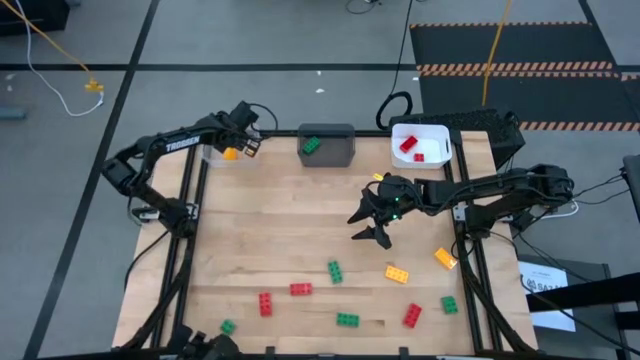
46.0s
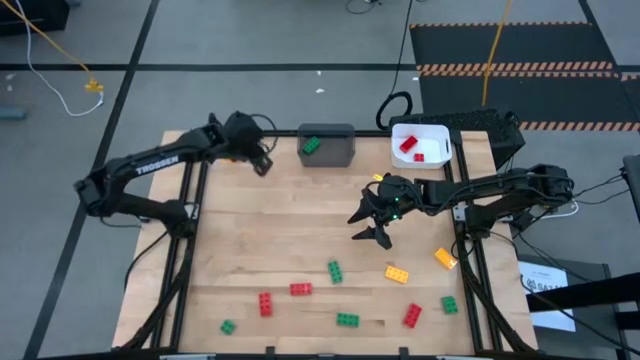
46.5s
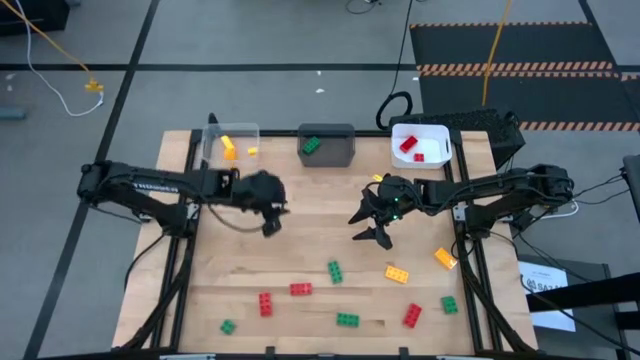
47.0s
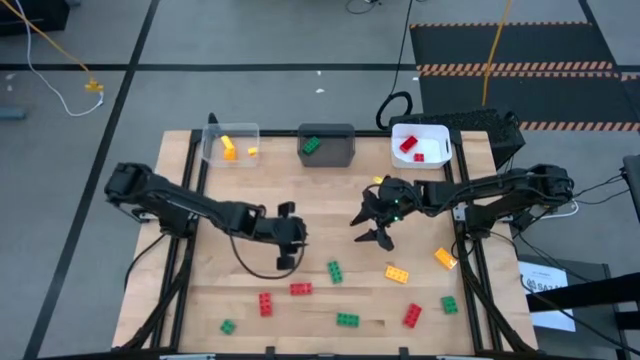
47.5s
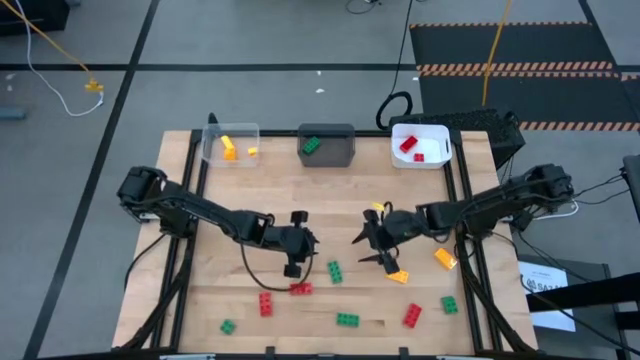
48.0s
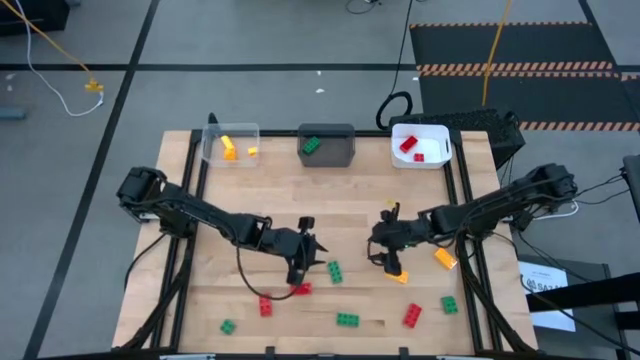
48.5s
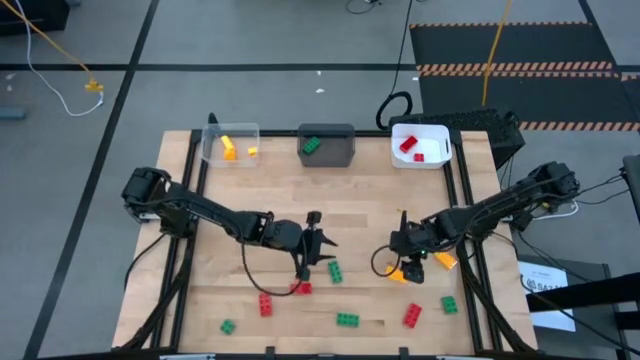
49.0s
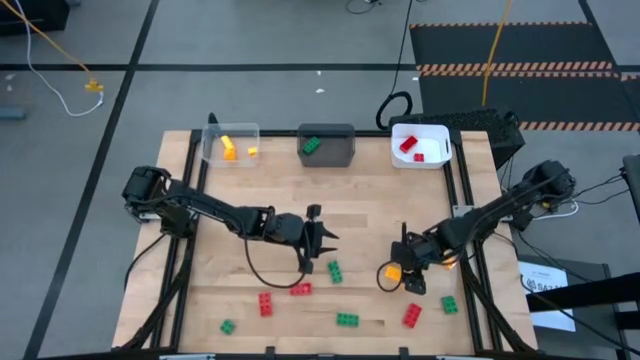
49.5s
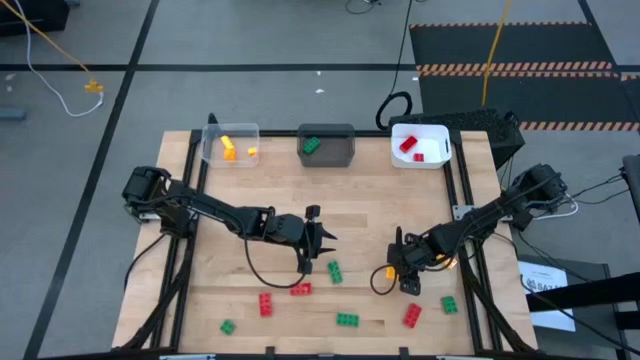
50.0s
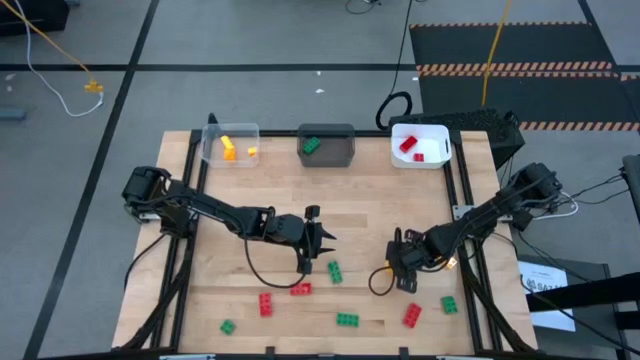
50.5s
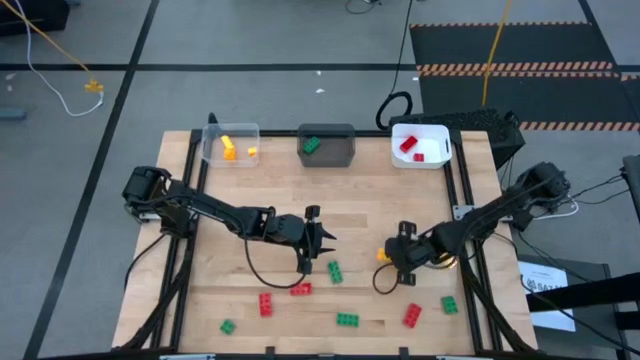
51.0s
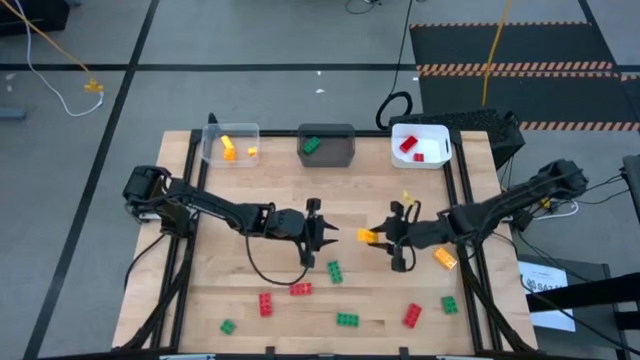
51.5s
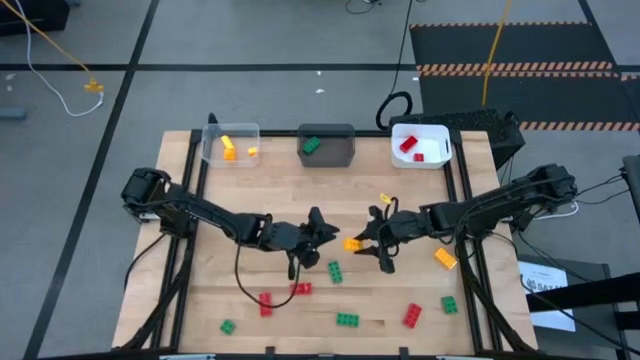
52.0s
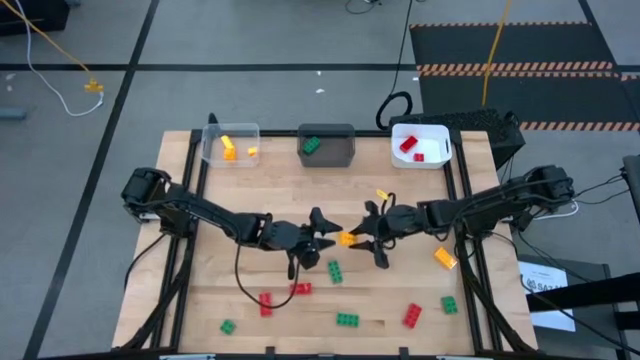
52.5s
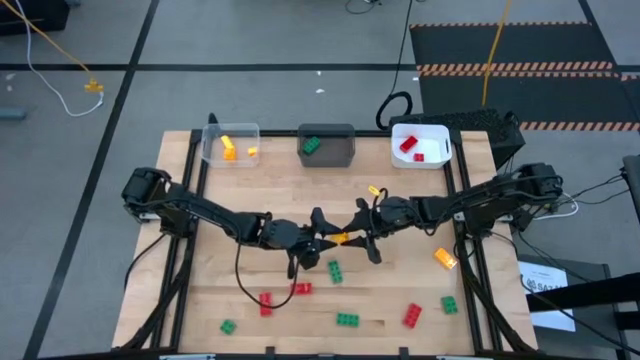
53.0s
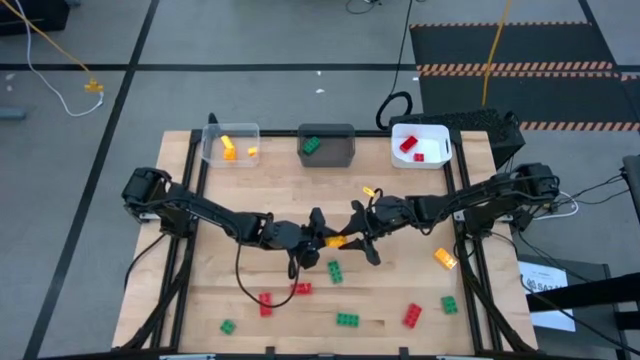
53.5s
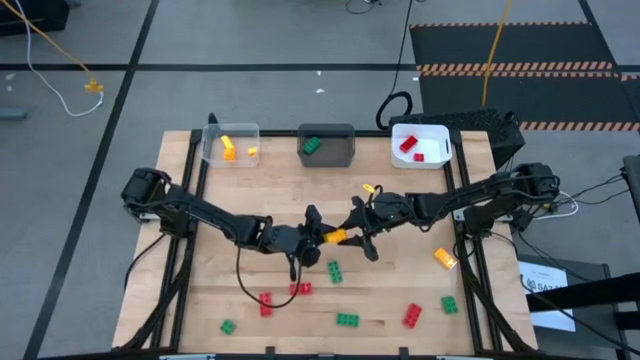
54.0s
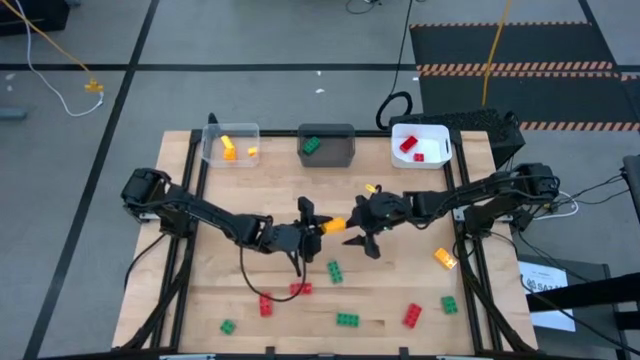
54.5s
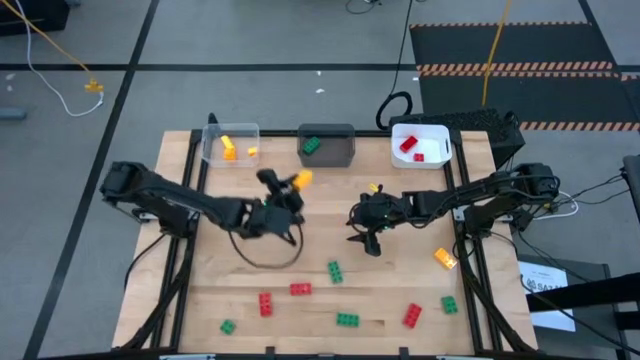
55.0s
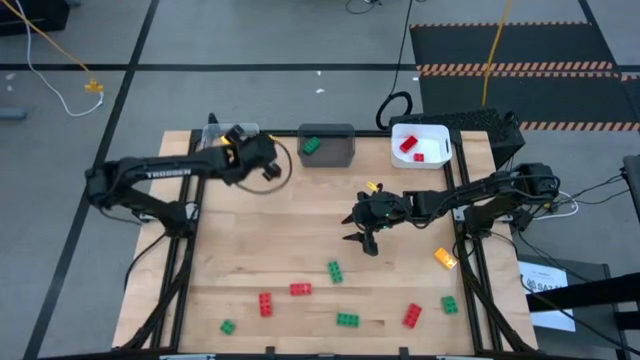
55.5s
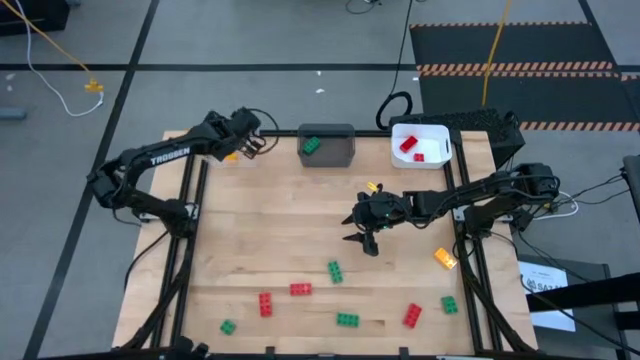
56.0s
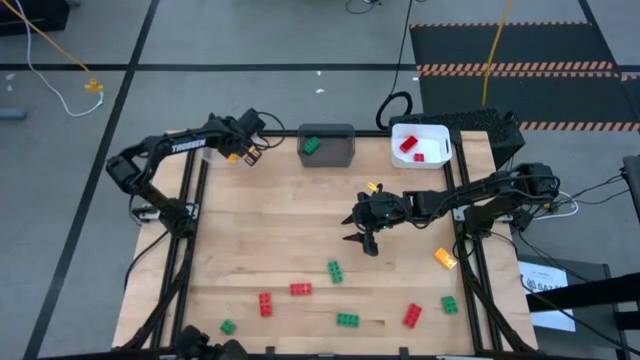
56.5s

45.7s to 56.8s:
Task: Sort & place blocks by color
Put the left 8 stud yellow game piece into the transparent bin

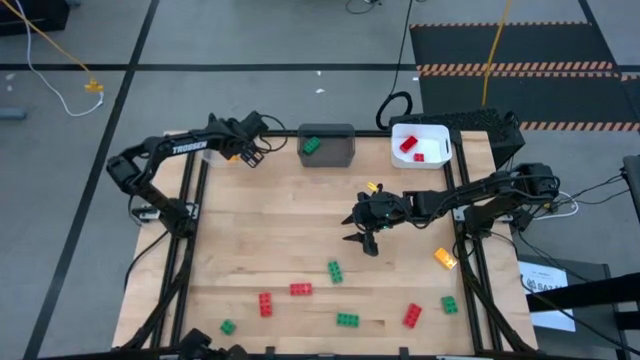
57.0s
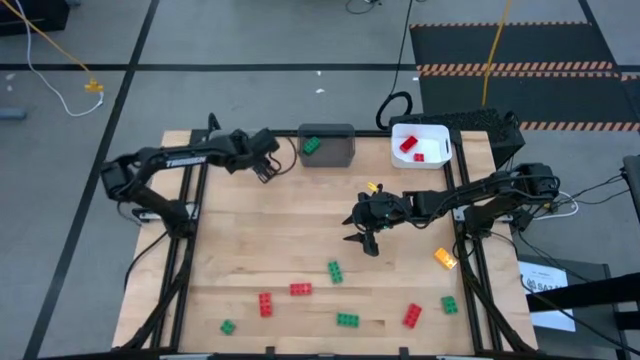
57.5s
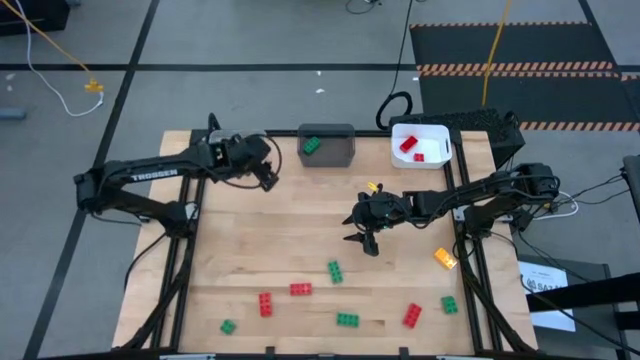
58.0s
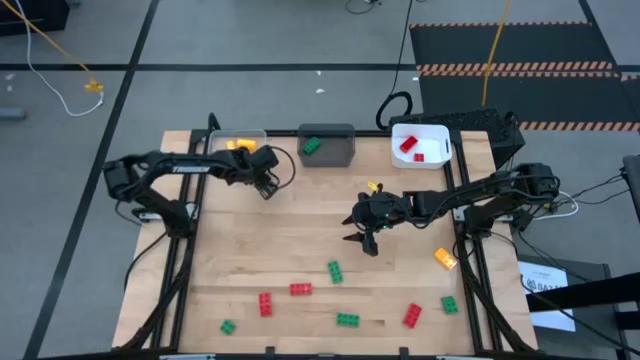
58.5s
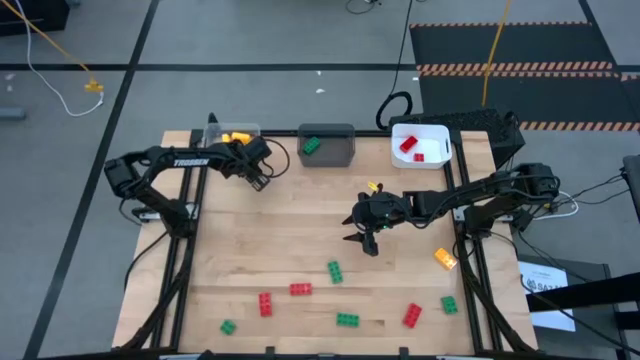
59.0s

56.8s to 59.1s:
Adjust the position of the transparent bin

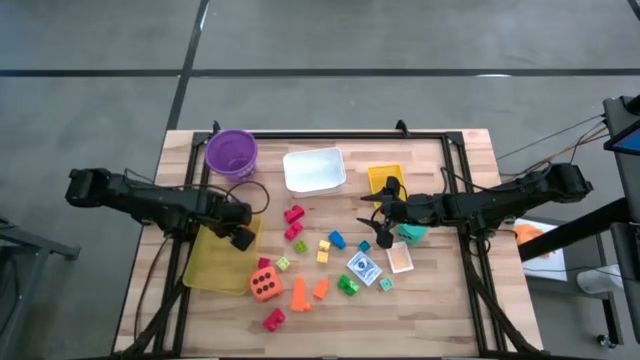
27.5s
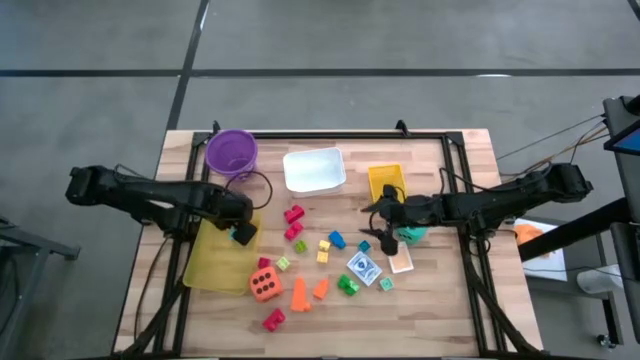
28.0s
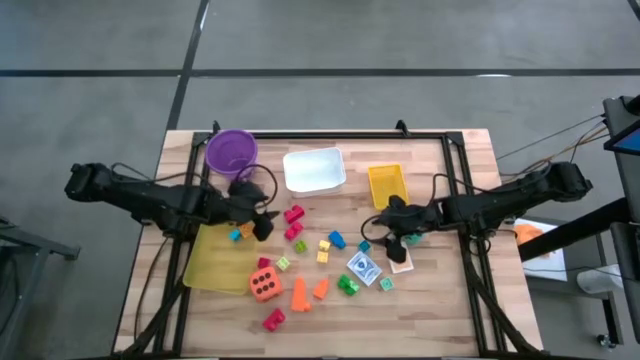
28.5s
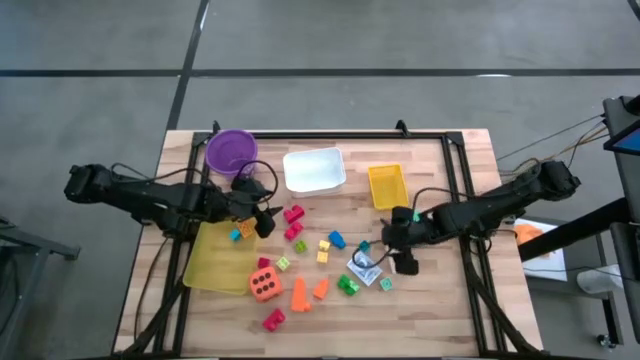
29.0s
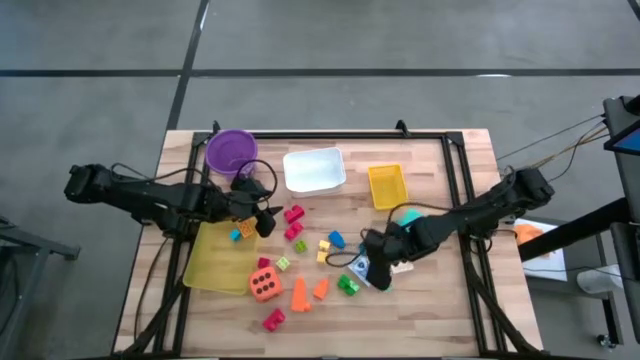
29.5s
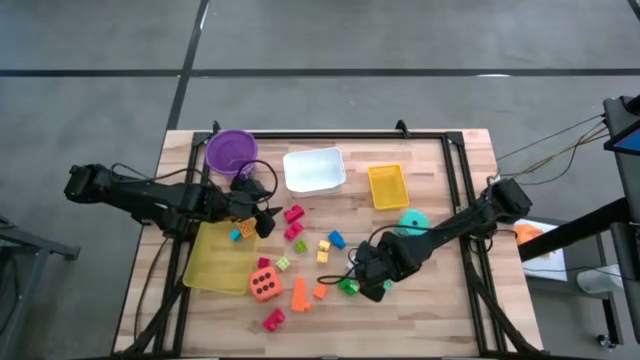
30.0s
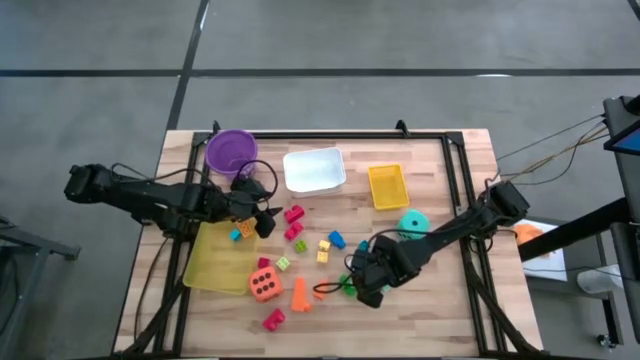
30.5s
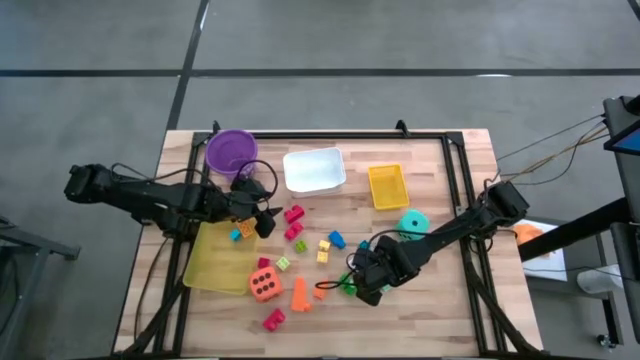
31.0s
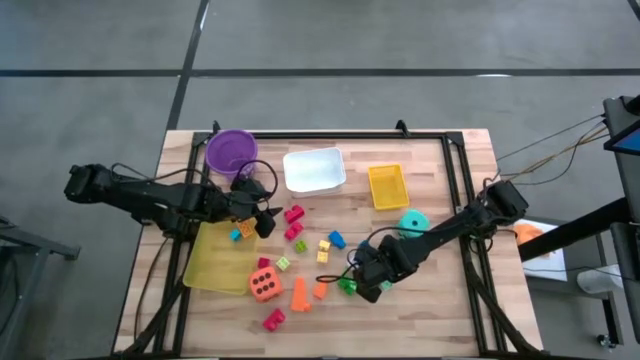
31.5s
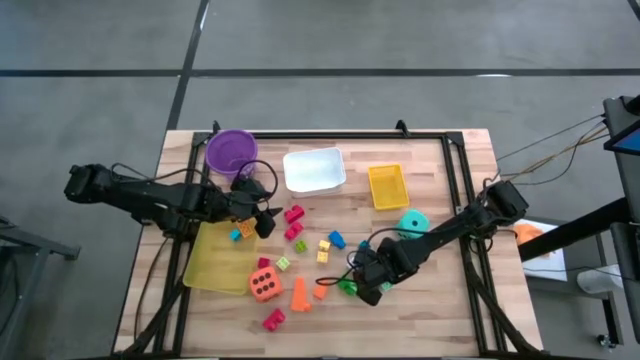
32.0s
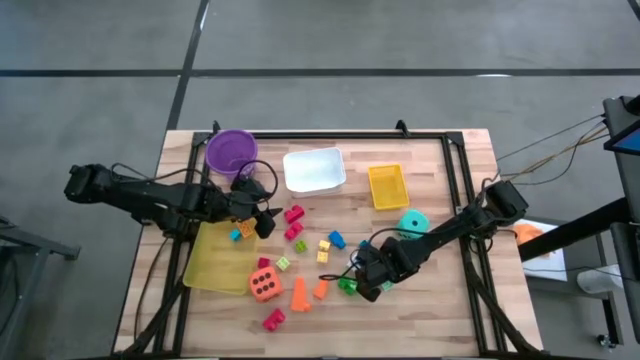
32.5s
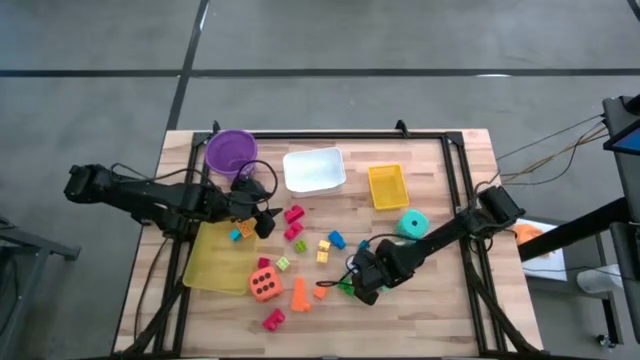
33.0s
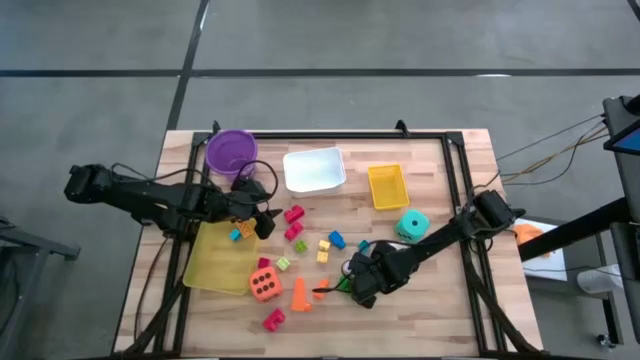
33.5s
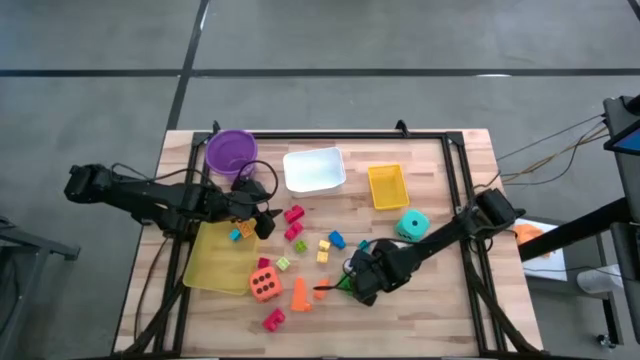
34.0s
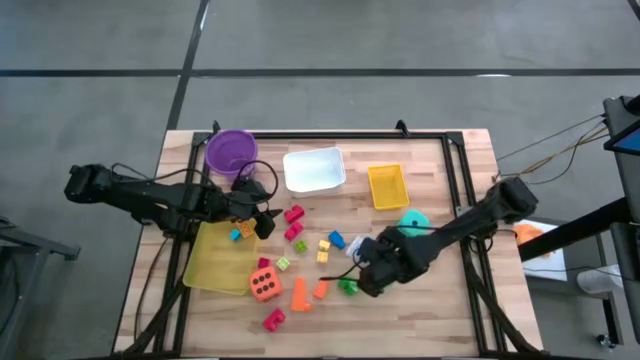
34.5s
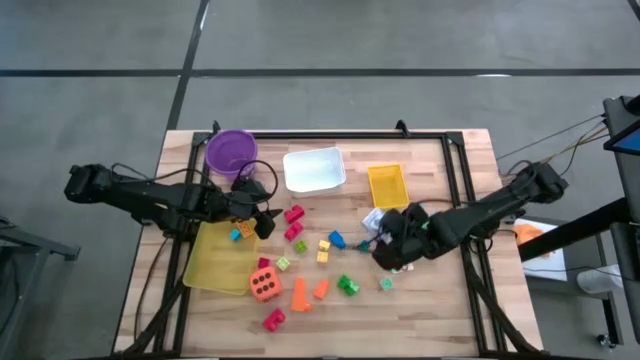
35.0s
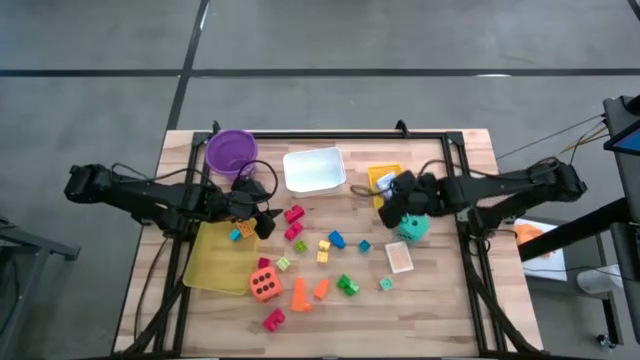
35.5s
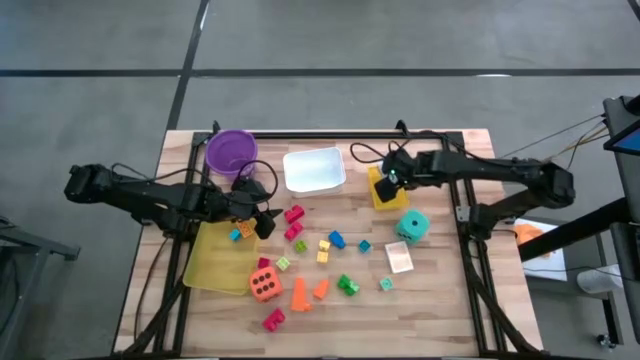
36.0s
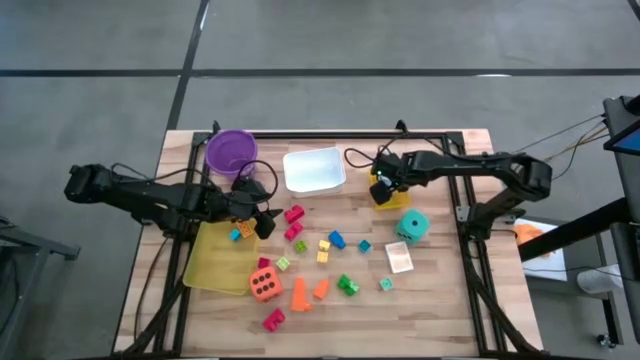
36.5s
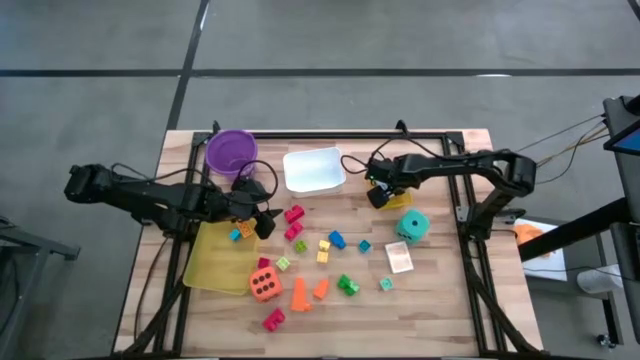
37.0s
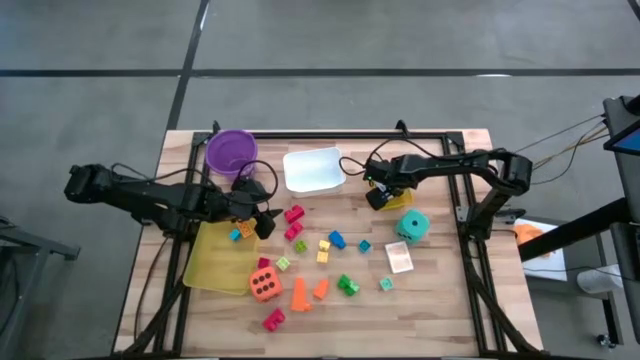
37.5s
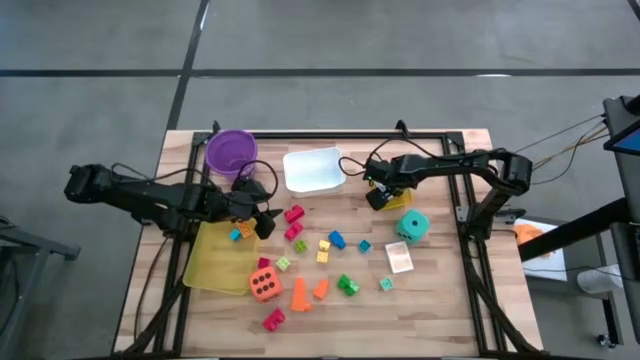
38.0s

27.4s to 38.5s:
Task: Pick & Place Toys
Put the blue deck of cards into the yellow bin
